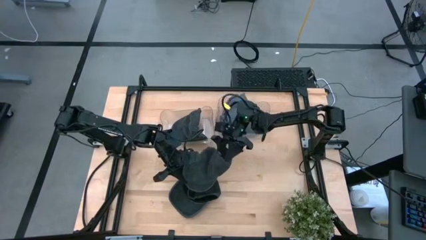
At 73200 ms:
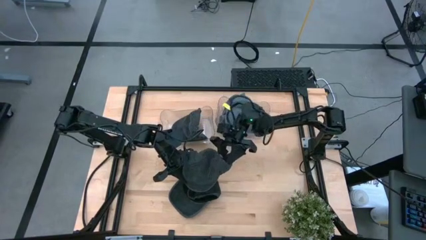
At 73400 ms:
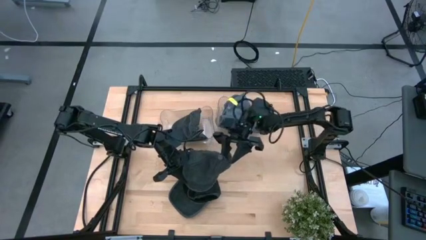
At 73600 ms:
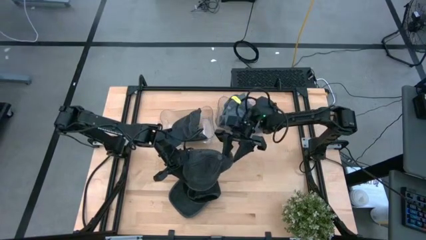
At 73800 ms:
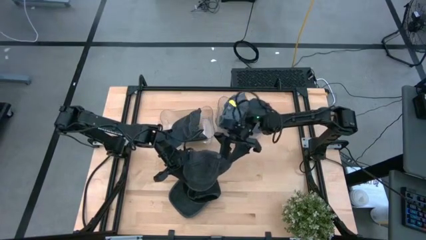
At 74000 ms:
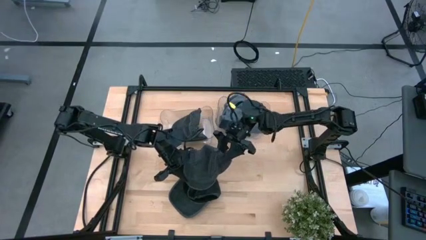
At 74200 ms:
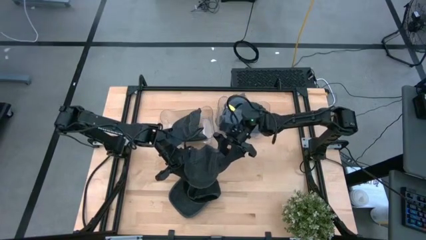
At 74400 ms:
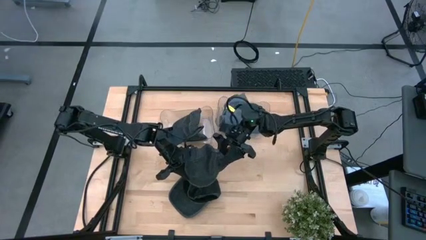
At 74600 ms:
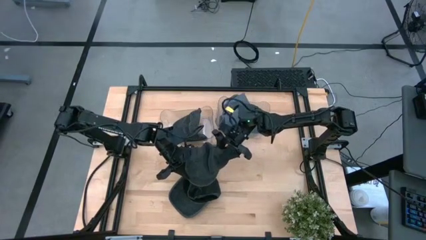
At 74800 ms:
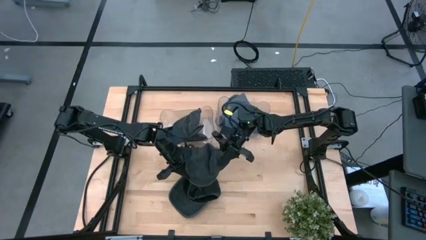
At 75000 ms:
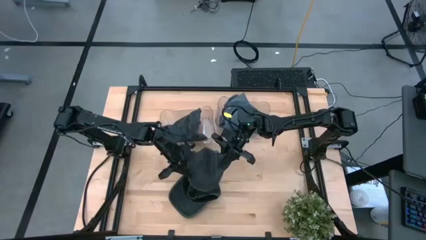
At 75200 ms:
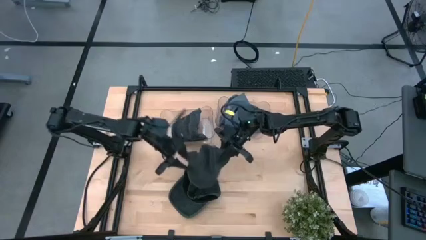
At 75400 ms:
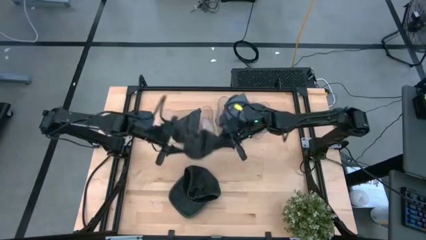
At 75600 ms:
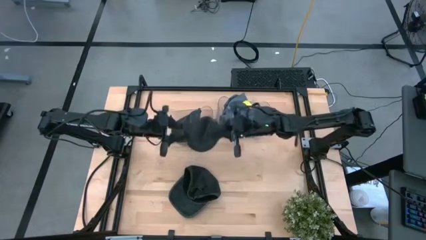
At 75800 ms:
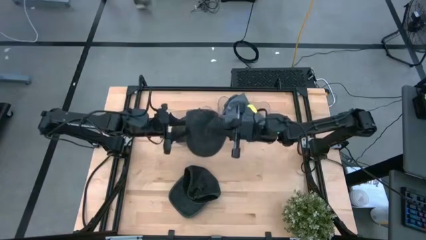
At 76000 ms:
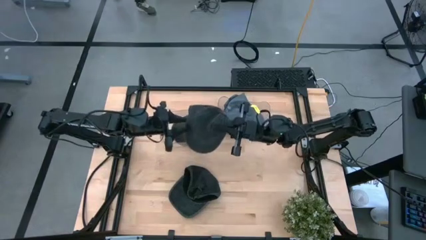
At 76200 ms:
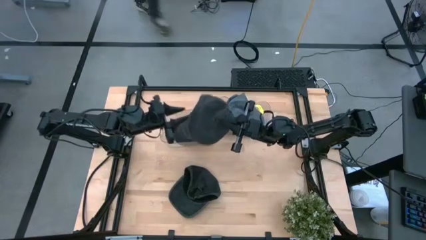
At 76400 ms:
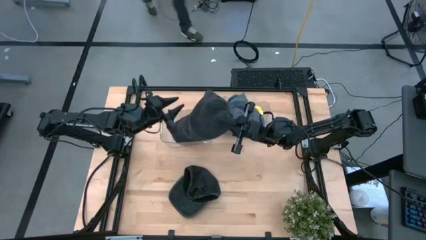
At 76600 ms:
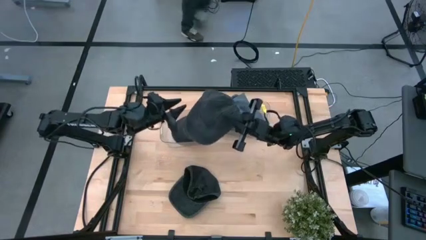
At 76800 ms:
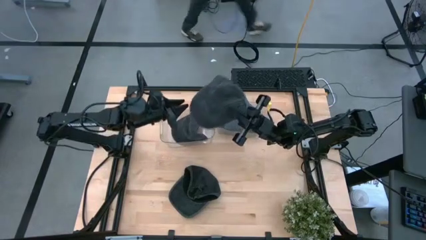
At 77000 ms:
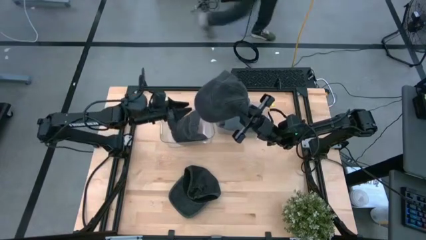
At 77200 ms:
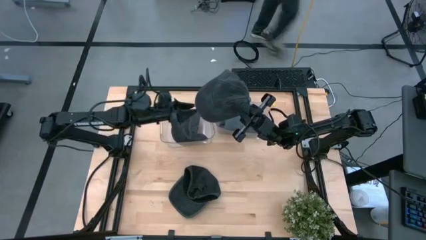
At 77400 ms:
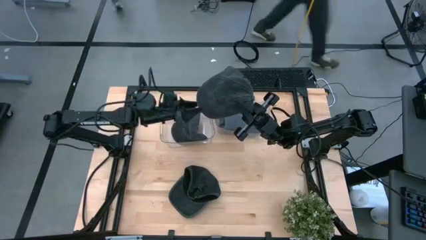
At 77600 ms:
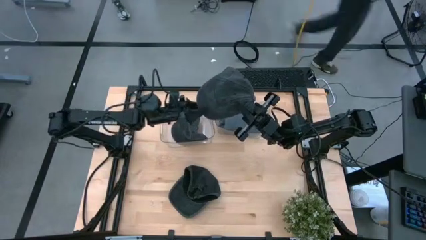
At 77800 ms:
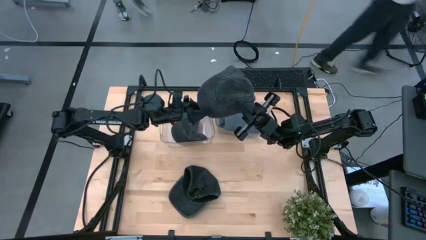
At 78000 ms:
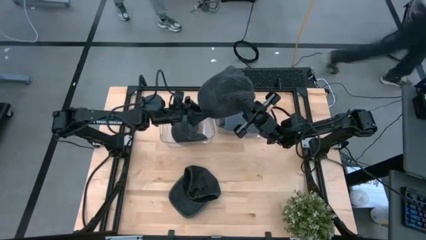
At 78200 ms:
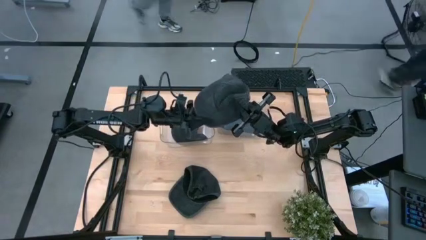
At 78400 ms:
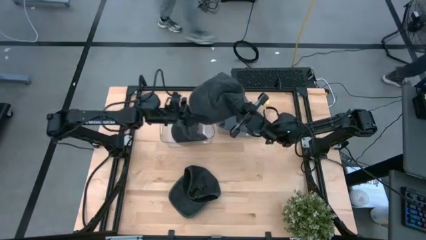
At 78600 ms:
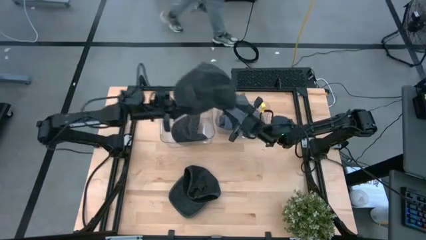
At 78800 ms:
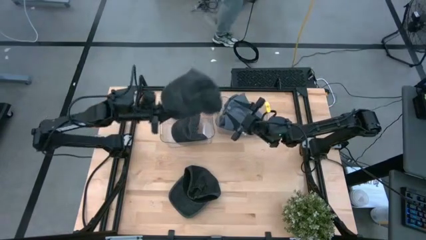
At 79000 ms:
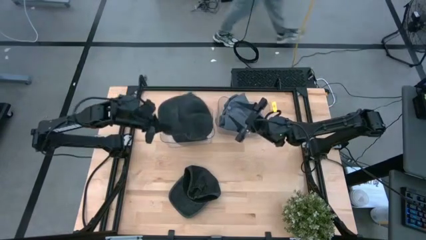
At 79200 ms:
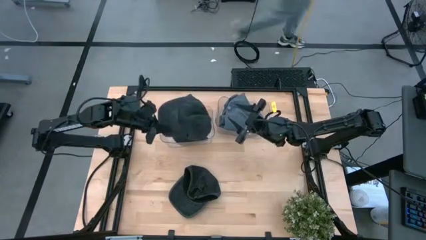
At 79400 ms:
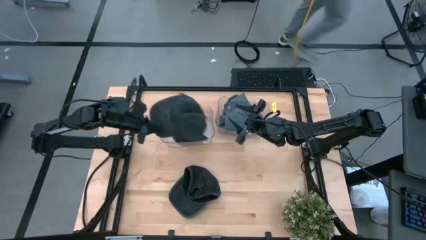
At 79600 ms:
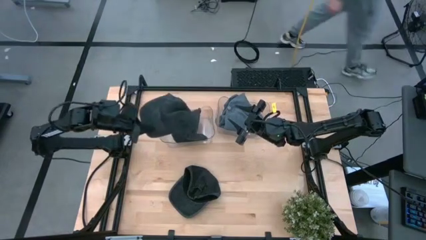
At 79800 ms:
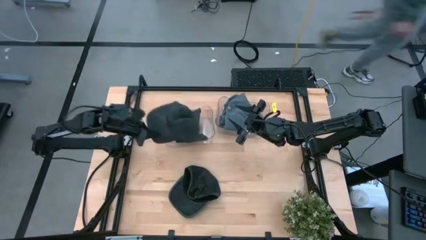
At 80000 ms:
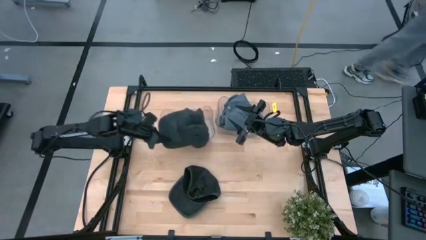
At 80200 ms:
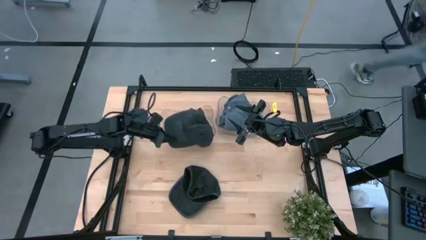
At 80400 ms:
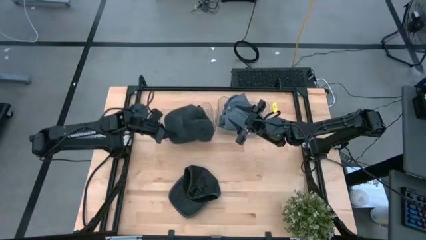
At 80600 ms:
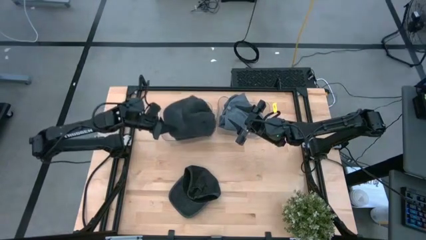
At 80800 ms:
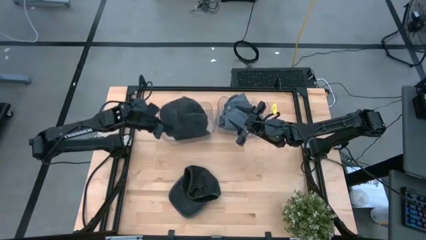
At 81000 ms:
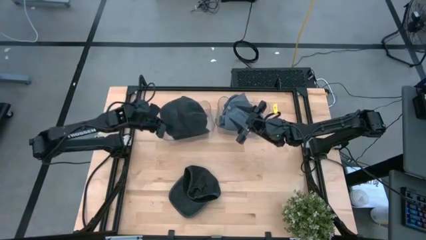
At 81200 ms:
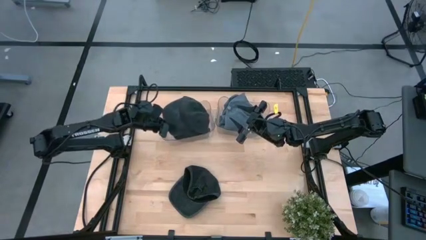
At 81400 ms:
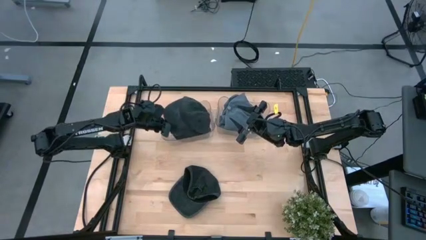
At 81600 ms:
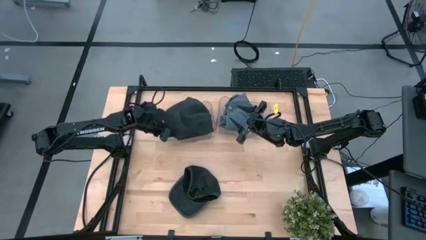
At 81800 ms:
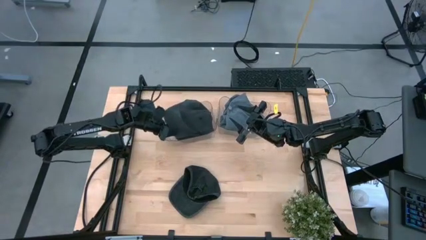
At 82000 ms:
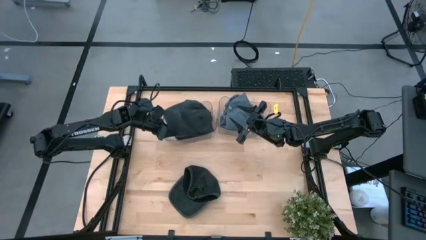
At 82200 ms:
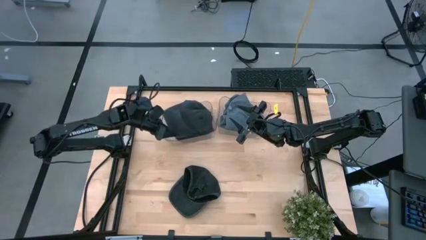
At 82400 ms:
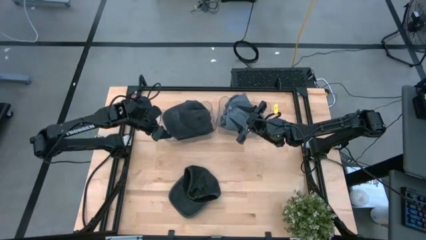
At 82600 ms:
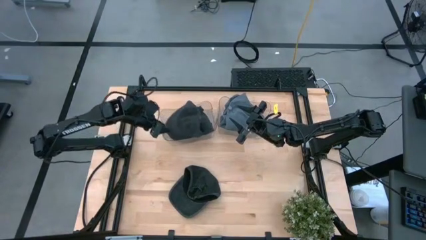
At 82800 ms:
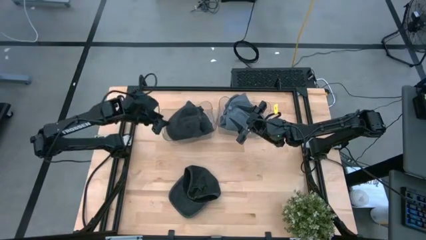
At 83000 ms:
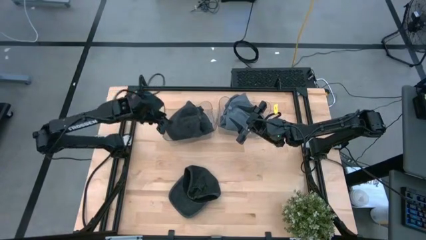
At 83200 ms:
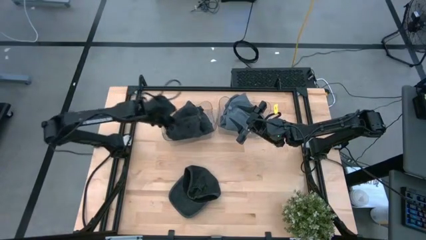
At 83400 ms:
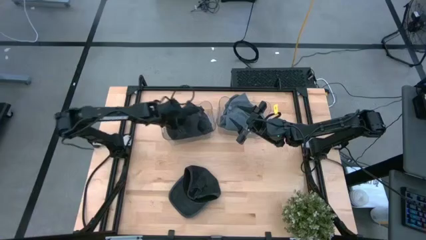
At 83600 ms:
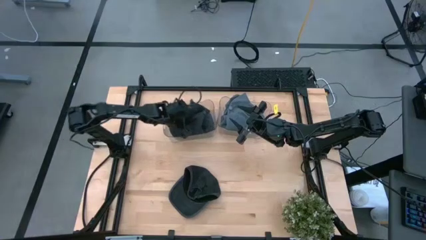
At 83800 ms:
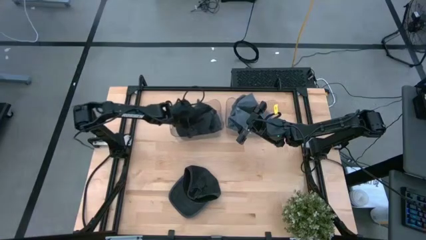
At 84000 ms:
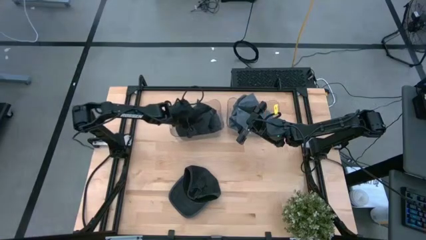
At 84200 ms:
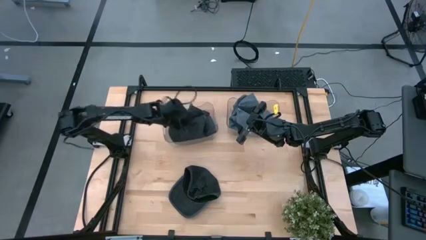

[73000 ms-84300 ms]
Task: Pick & Place hat
Put the top black cap into the left transparent bin

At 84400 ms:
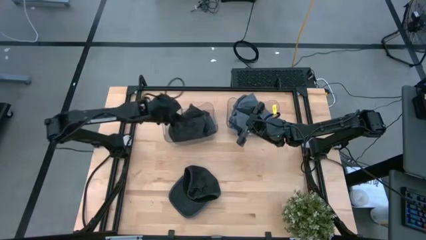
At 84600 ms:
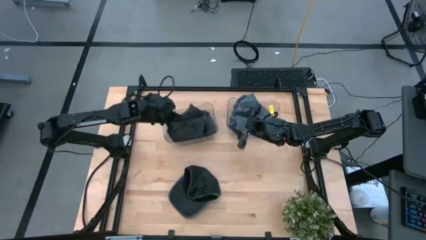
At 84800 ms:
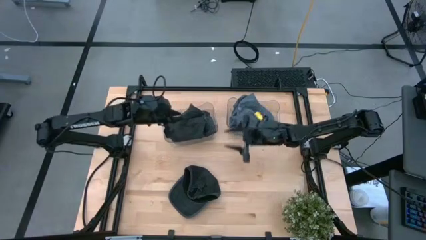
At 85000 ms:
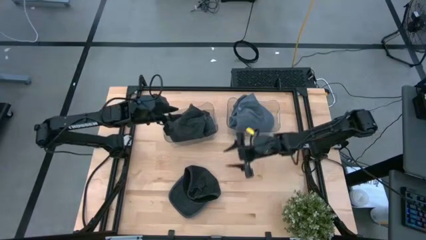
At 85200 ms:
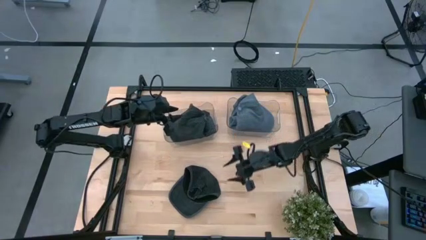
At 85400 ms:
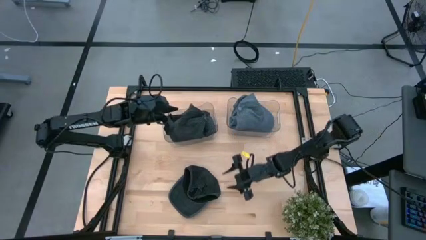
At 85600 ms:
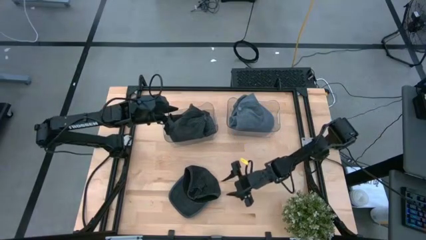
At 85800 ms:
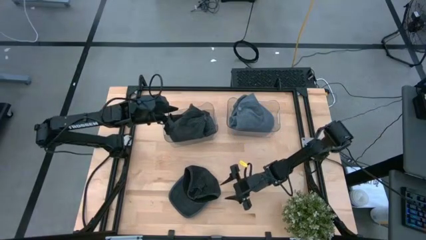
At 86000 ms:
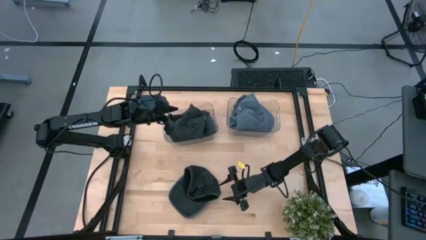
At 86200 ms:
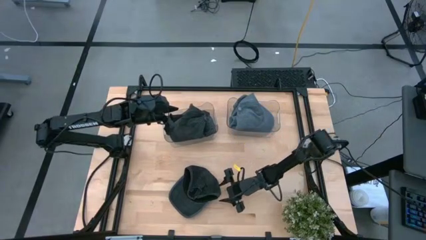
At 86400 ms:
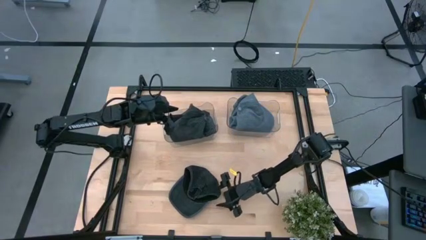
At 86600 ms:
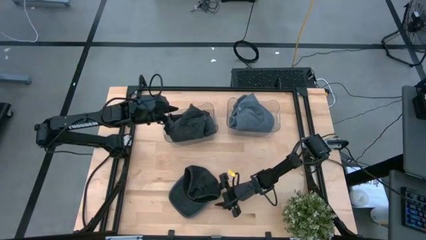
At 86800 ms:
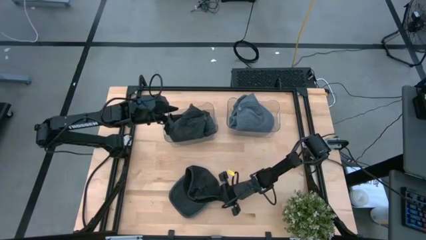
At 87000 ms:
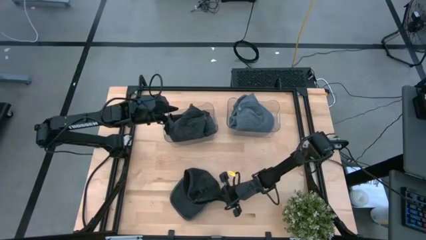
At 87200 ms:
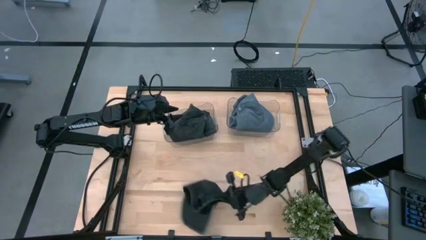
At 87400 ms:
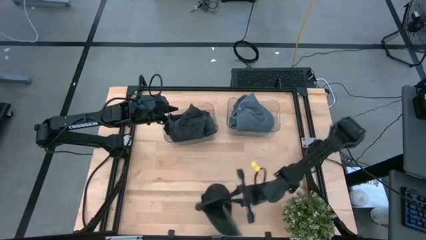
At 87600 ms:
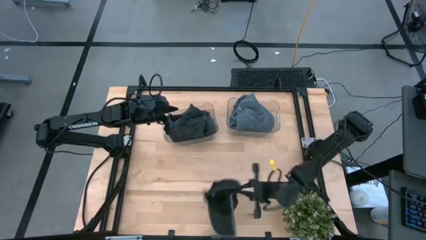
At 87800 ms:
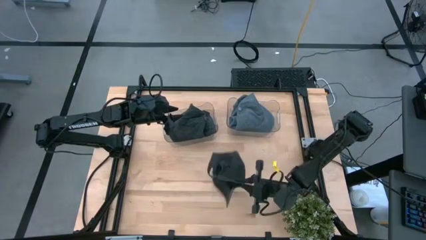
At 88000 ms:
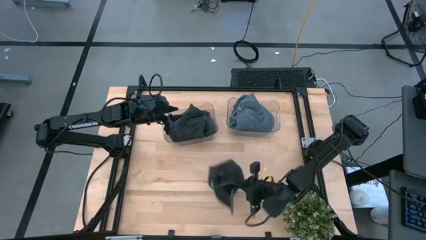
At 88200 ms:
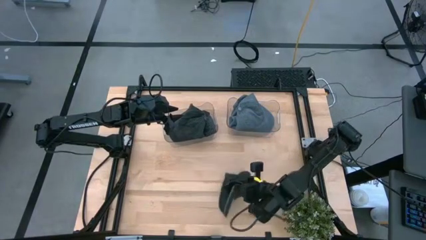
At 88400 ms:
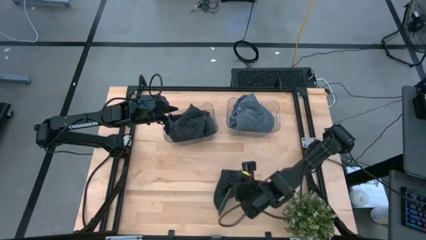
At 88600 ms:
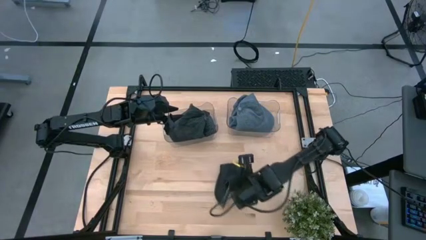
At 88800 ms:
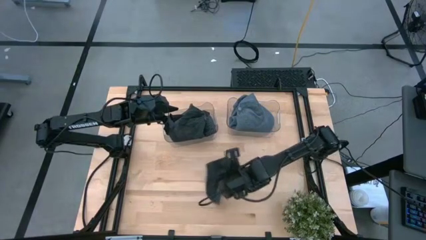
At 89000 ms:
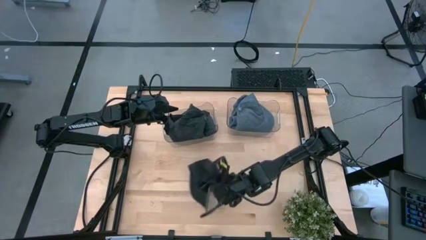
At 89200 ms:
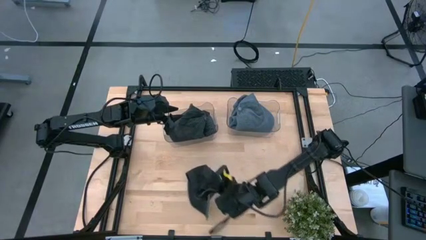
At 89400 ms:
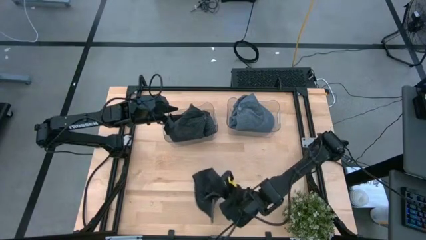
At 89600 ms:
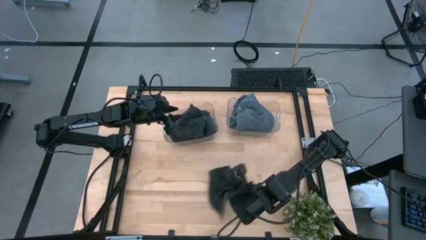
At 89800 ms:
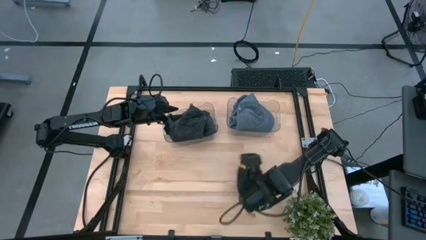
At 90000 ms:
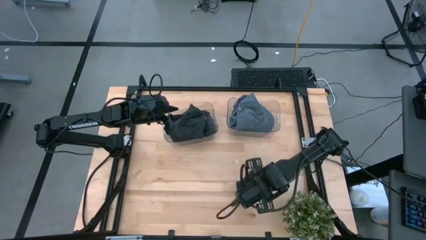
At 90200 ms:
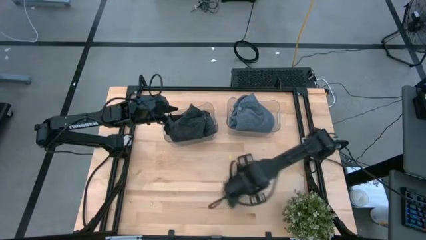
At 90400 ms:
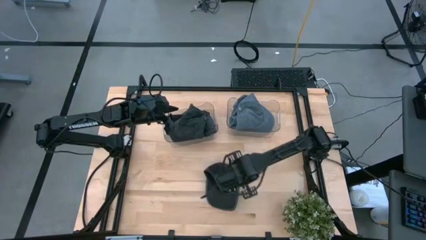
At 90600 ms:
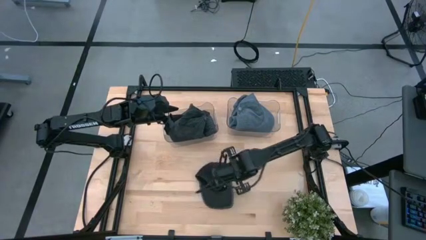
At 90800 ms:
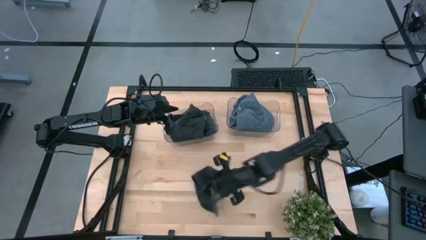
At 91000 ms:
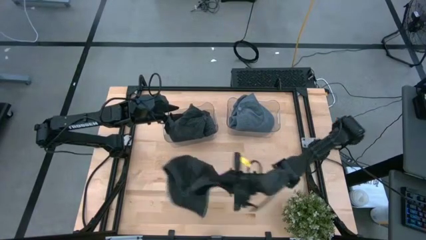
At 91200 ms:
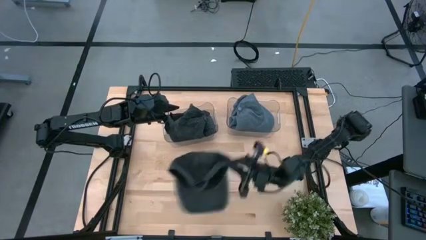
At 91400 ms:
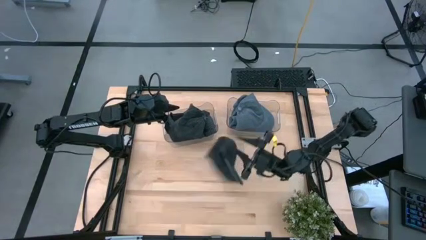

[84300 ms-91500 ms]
Put the black cap into the left transparent bin
